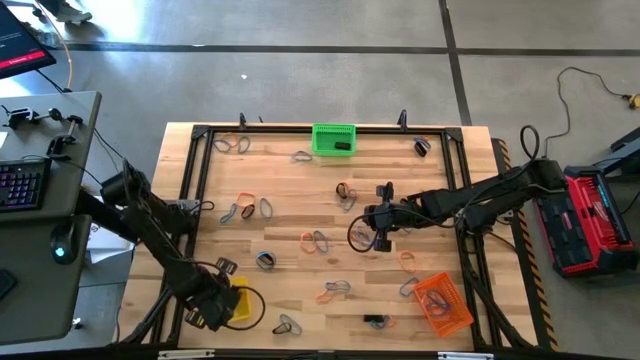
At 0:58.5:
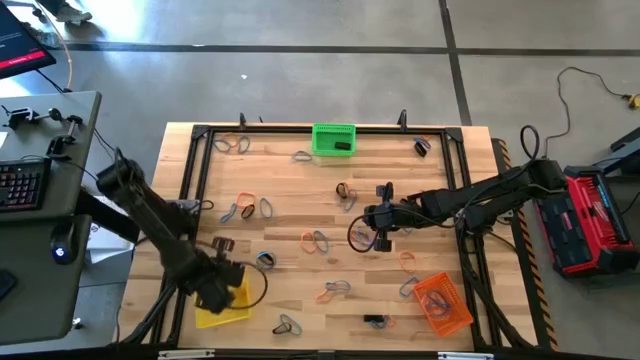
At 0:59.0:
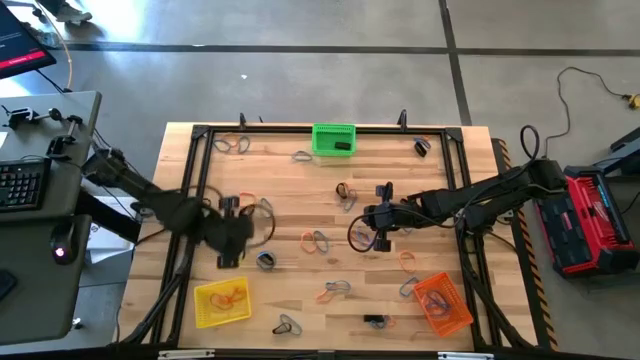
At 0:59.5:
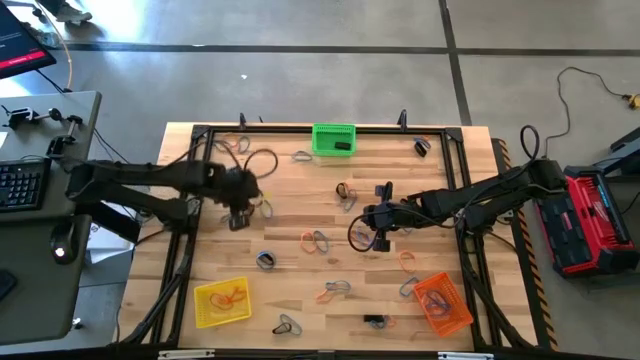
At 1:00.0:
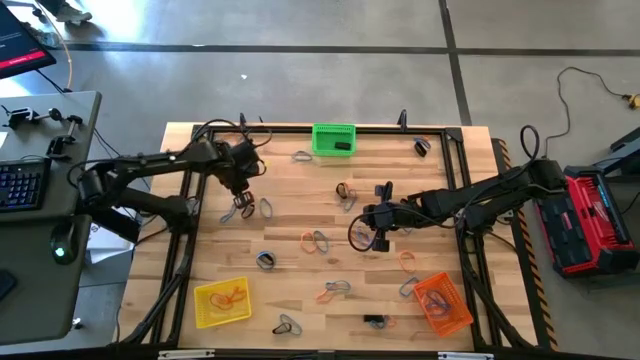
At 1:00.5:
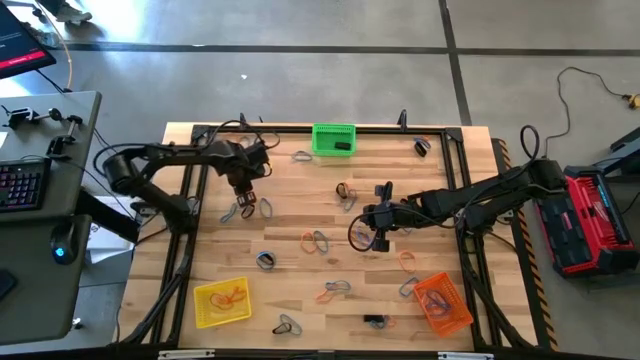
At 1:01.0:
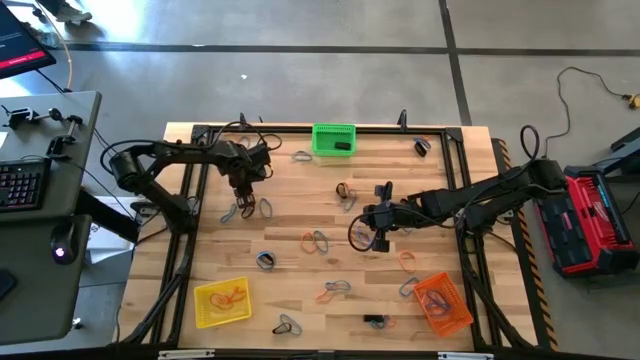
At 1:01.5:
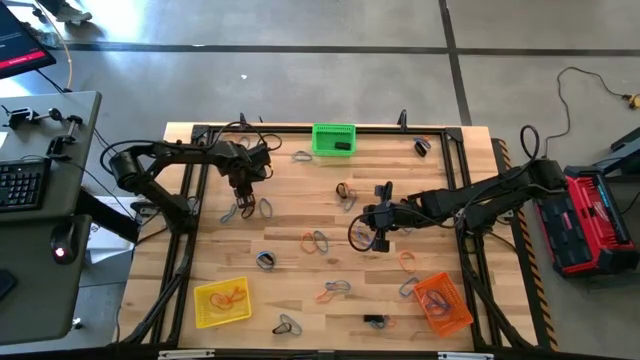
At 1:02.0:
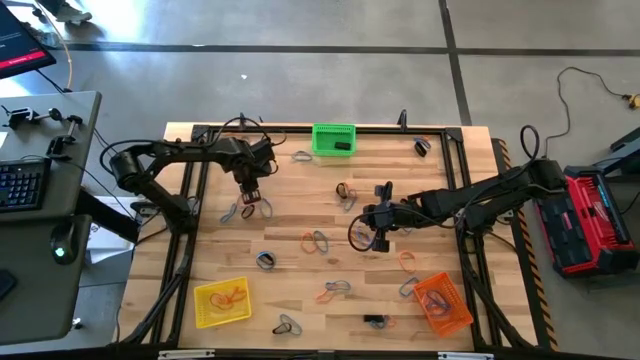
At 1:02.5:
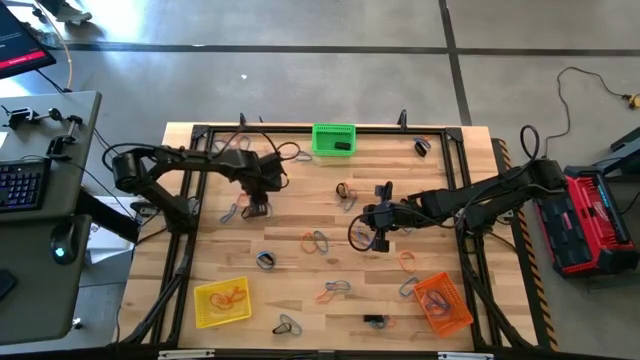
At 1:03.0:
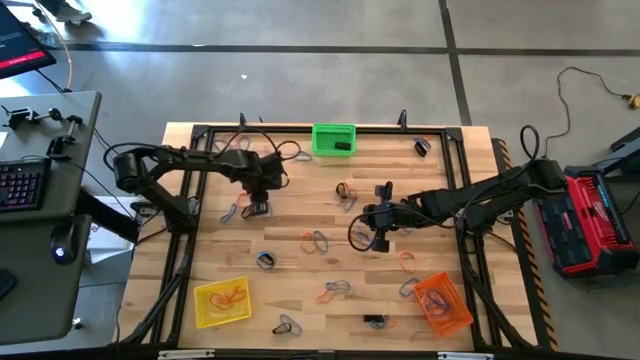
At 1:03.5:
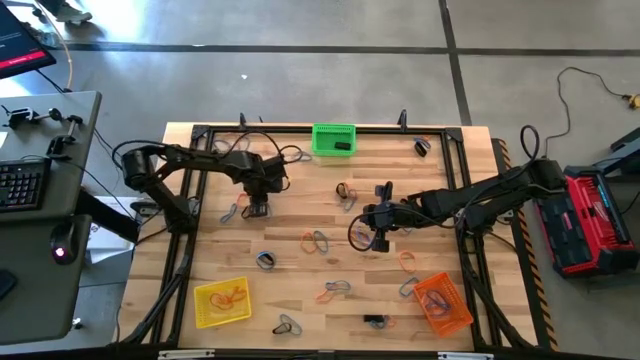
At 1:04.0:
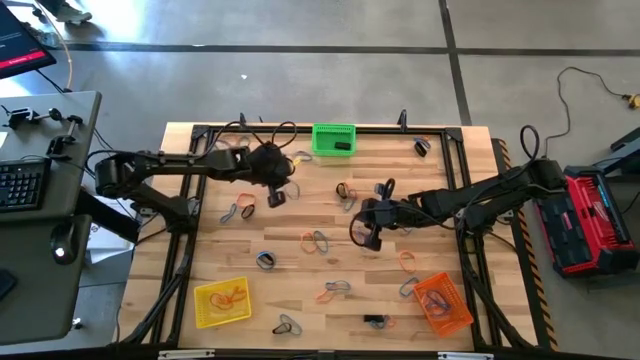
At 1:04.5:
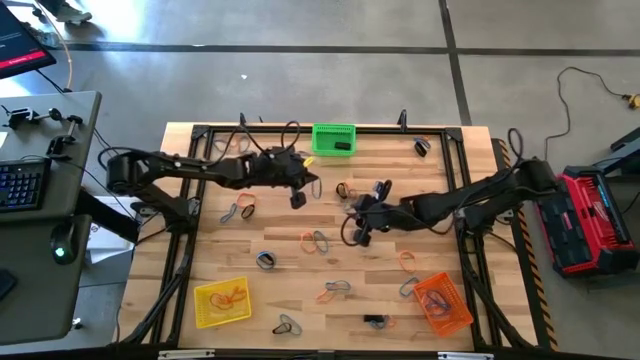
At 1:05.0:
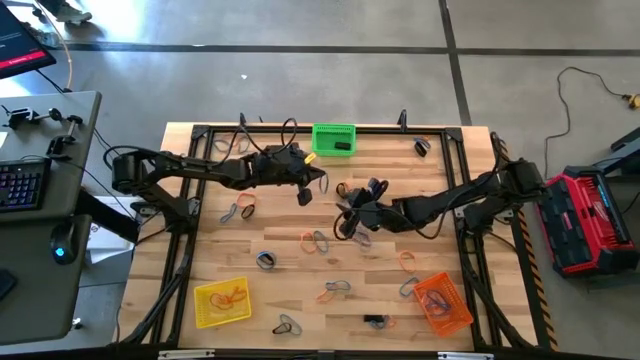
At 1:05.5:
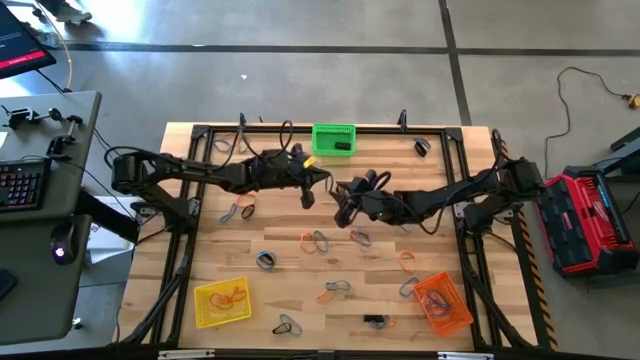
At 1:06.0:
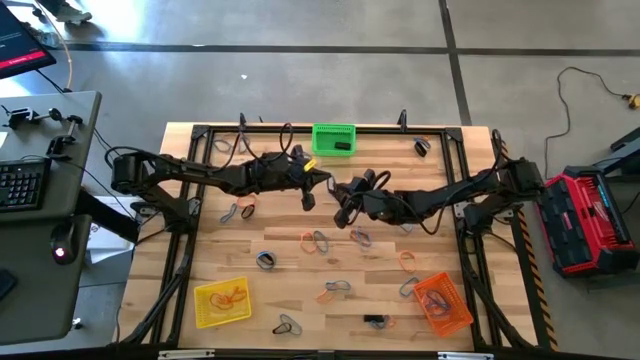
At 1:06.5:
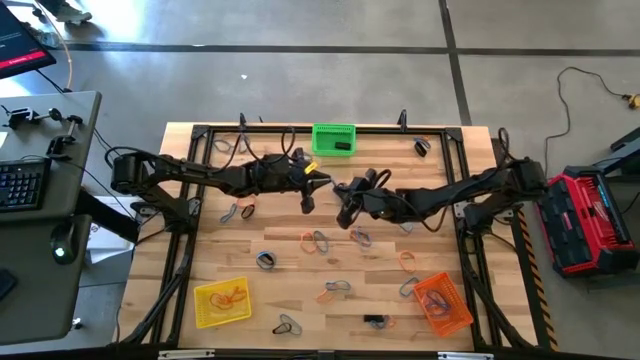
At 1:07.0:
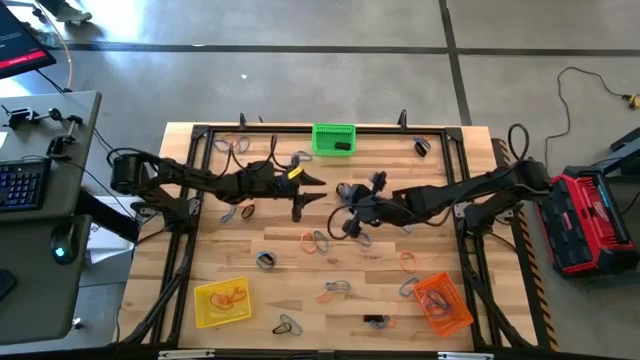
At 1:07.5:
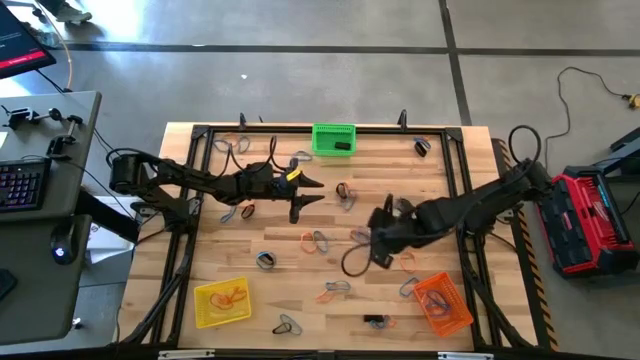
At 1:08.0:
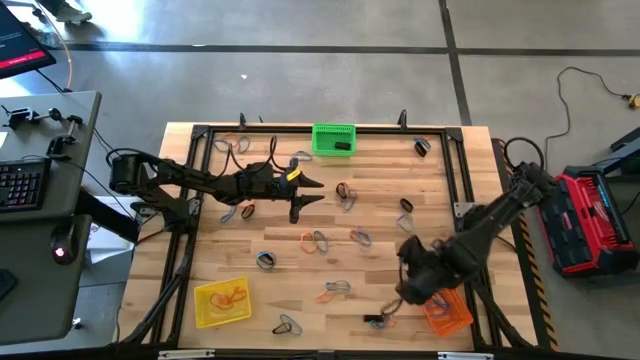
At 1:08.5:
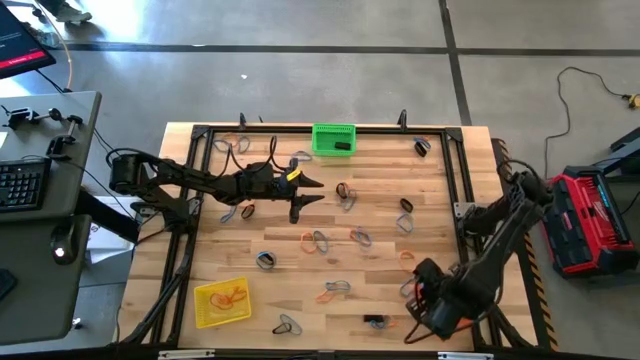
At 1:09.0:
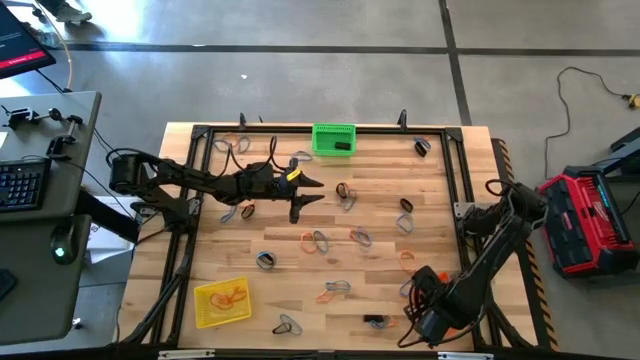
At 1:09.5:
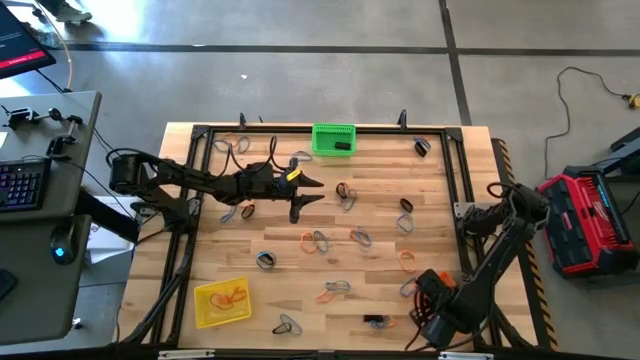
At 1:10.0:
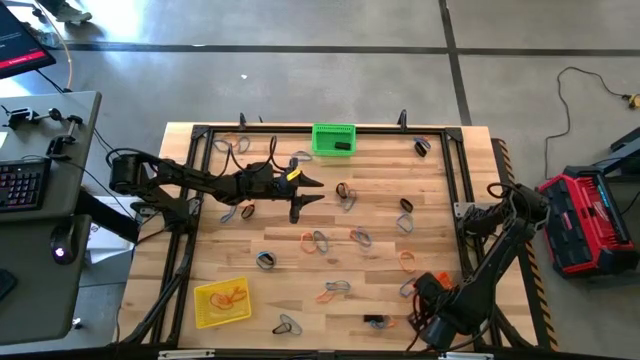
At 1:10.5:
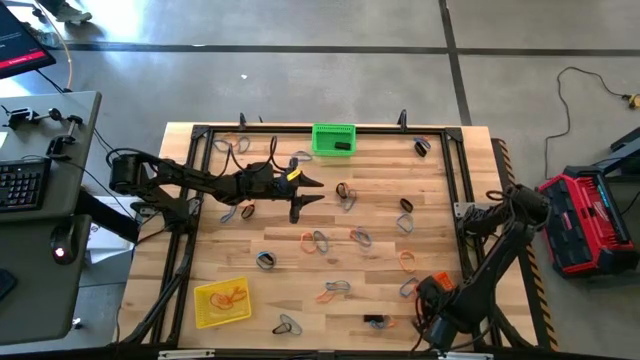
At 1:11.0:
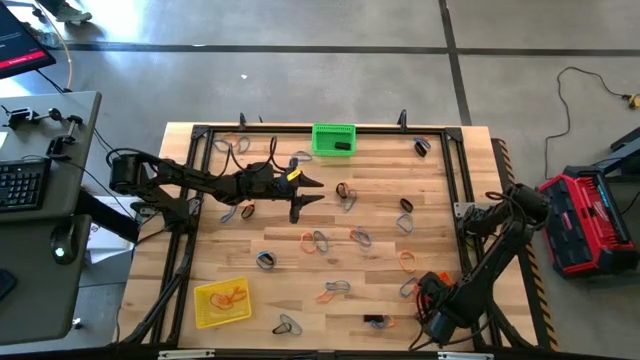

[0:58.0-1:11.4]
Task: Sort rubber bands into baskets
Put the blue rubber band into the orange bin

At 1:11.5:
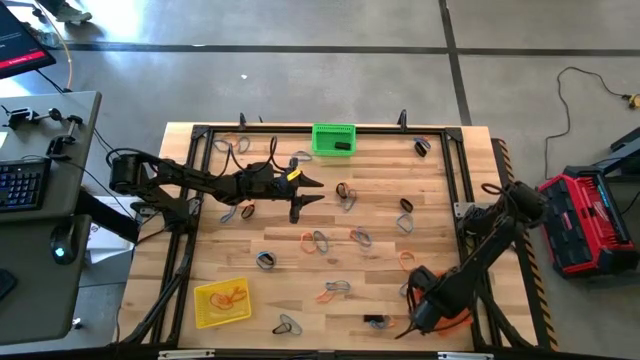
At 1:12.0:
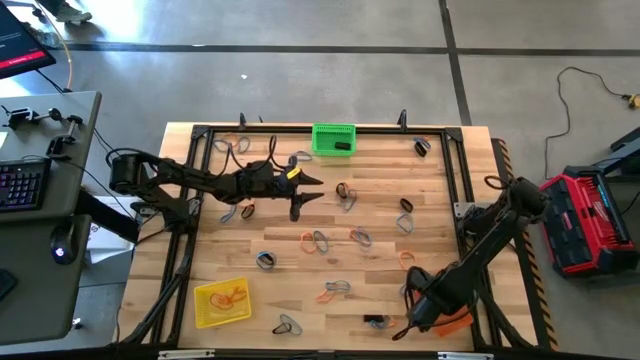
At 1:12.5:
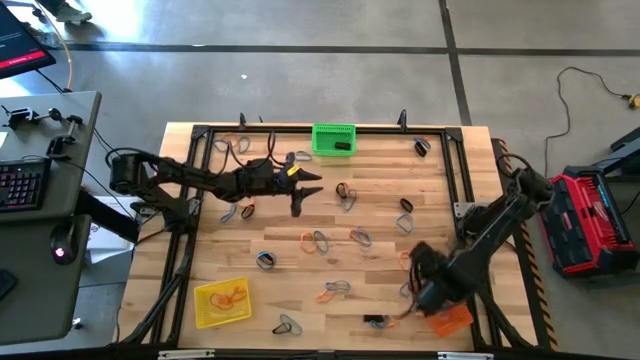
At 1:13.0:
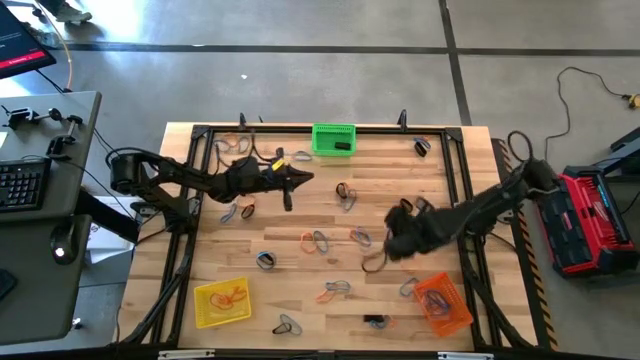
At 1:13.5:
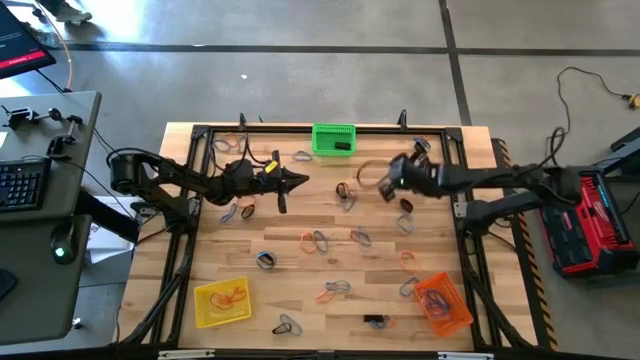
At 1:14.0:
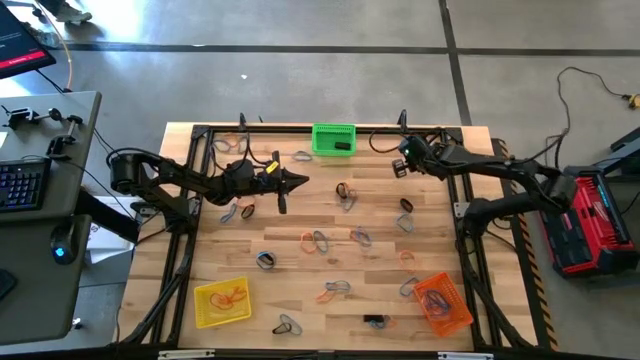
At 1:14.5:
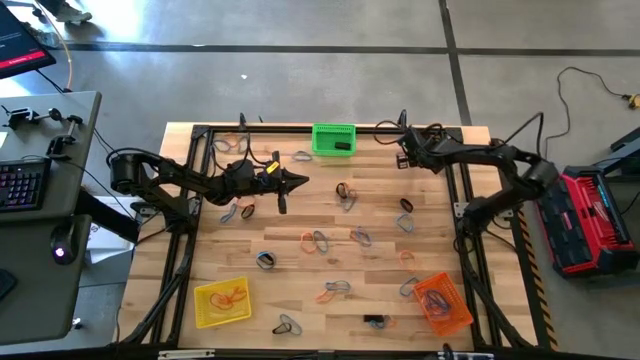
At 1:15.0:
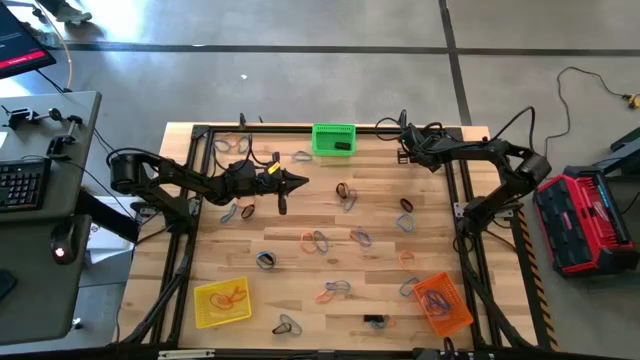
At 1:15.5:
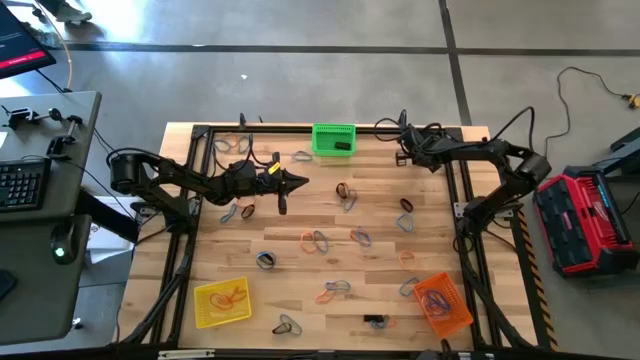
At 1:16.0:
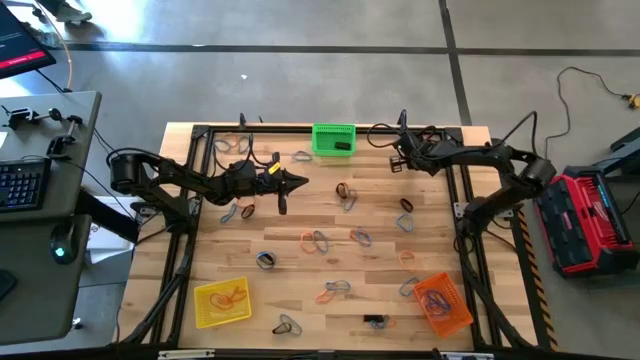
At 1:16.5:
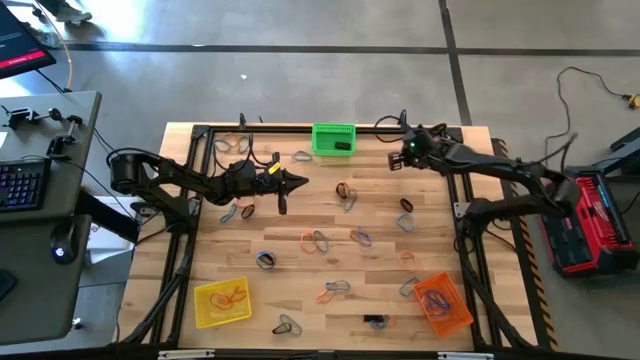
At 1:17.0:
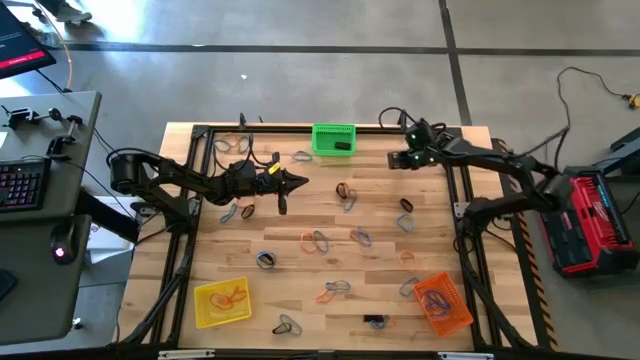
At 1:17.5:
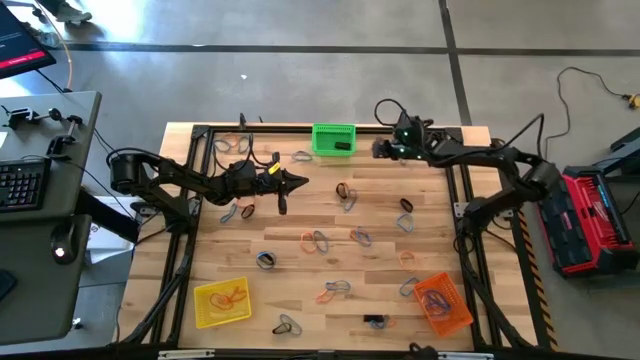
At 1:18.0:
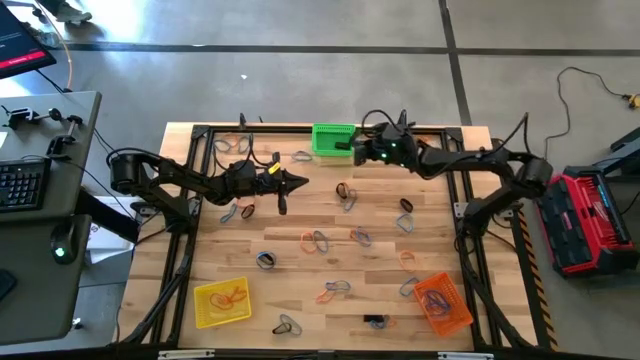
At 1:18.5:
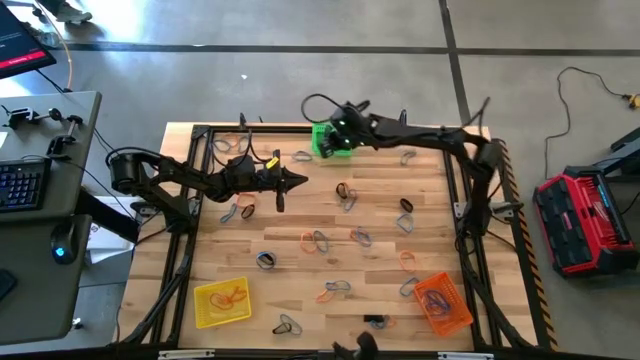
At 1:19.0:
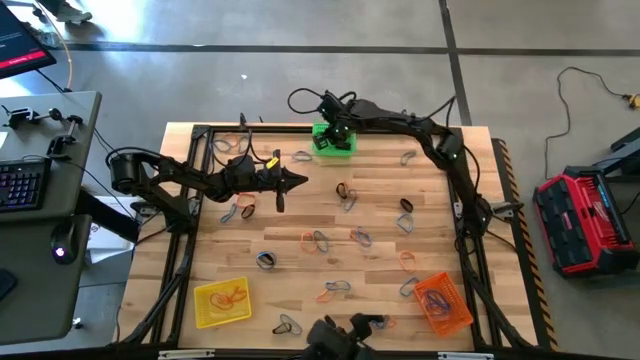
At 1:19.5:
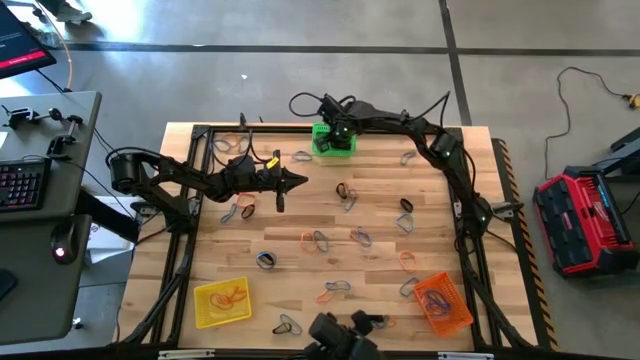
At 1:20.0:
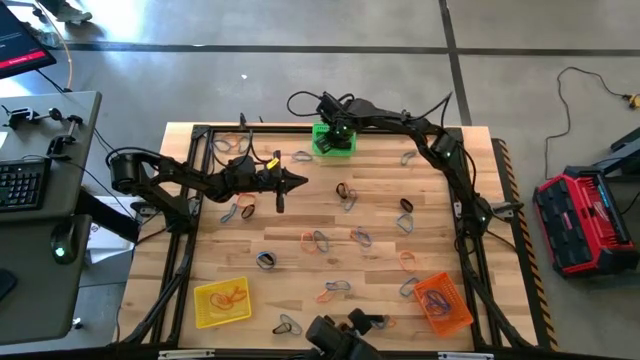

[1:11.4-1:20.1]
Put the black rubber band into the green bin
